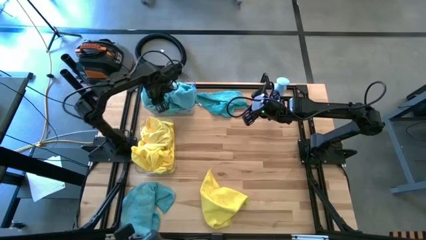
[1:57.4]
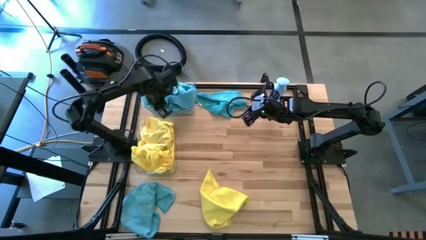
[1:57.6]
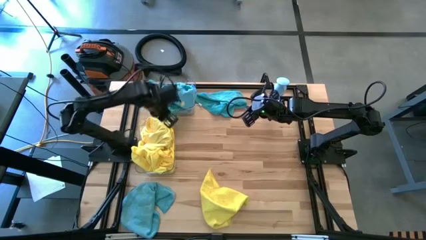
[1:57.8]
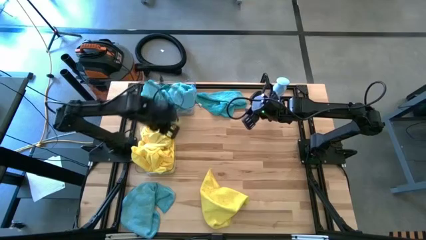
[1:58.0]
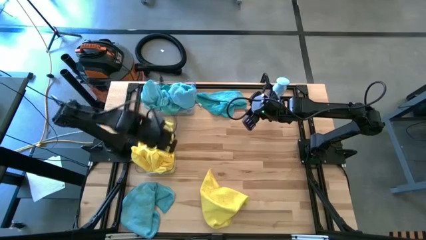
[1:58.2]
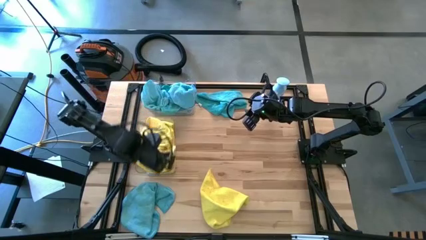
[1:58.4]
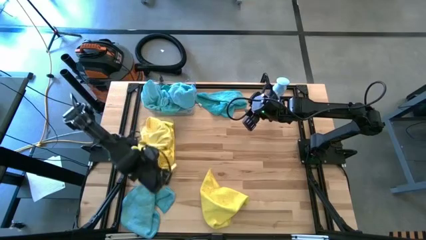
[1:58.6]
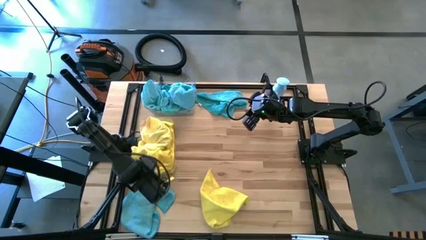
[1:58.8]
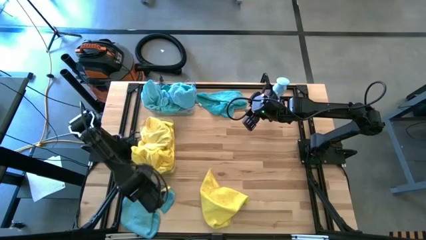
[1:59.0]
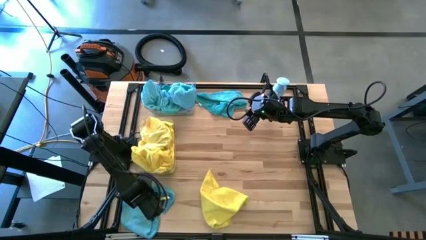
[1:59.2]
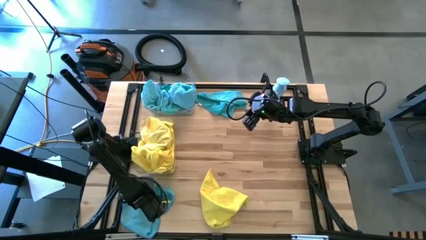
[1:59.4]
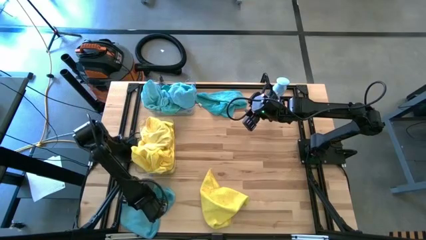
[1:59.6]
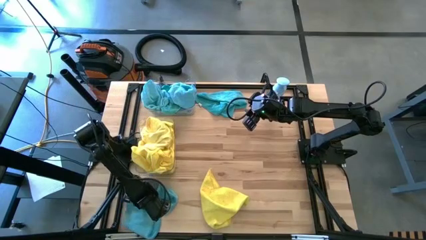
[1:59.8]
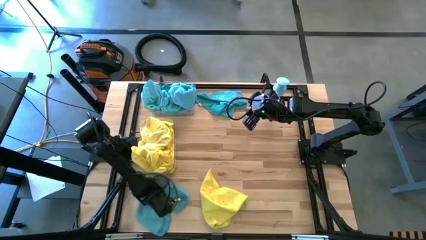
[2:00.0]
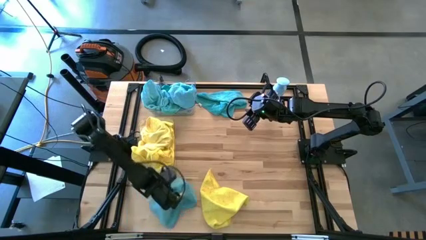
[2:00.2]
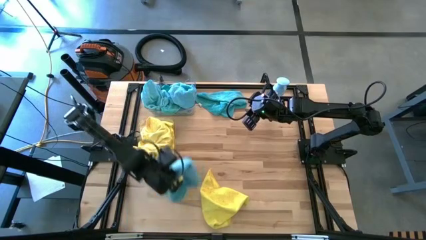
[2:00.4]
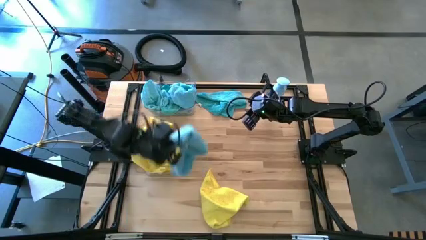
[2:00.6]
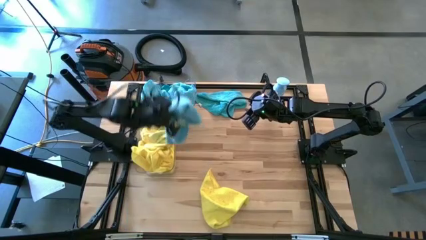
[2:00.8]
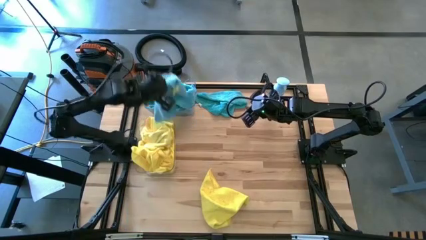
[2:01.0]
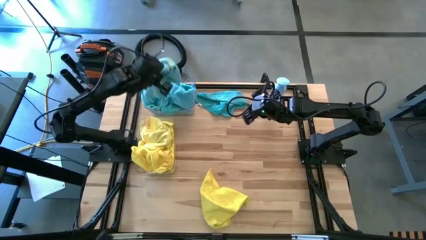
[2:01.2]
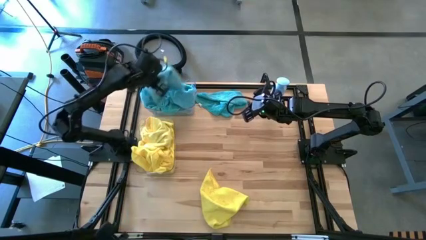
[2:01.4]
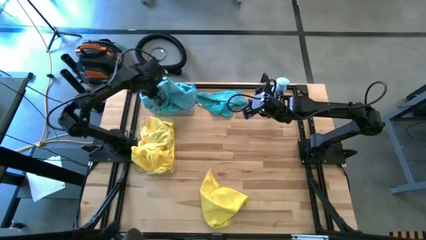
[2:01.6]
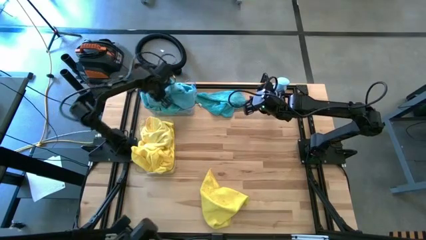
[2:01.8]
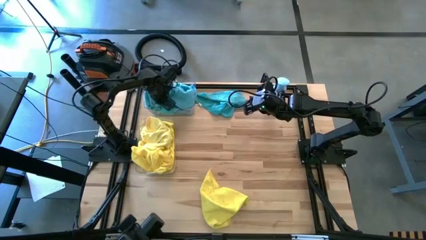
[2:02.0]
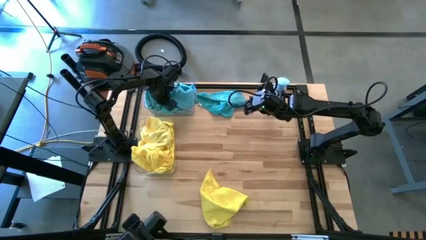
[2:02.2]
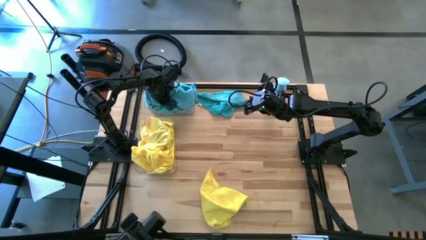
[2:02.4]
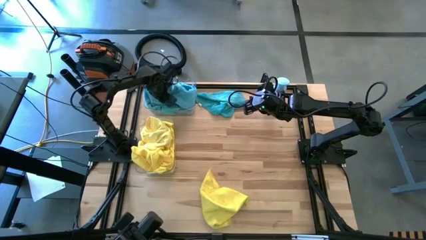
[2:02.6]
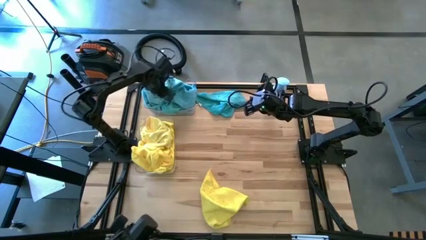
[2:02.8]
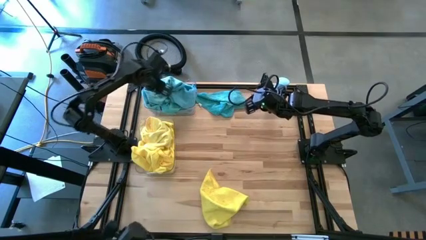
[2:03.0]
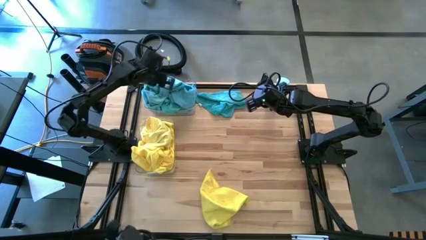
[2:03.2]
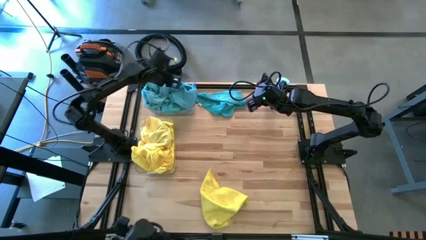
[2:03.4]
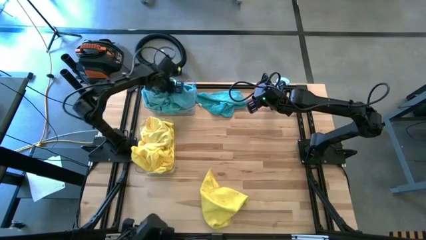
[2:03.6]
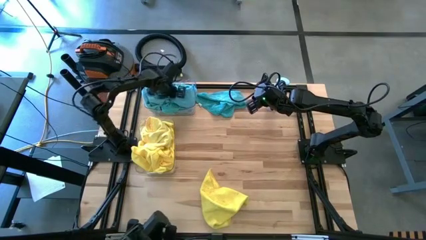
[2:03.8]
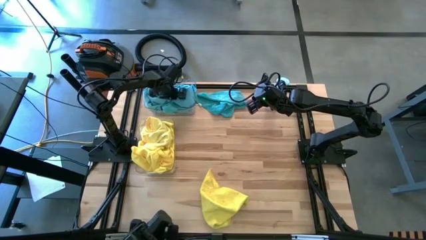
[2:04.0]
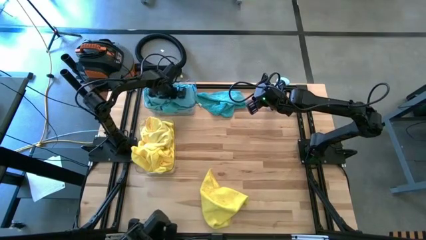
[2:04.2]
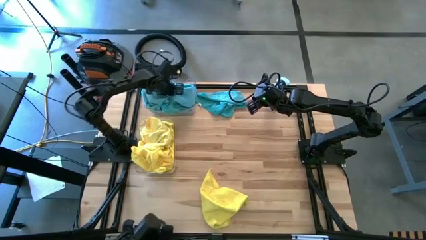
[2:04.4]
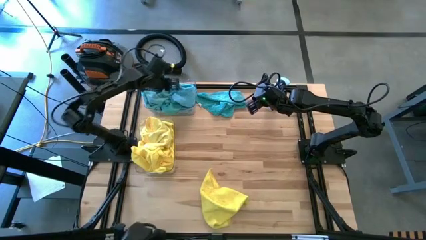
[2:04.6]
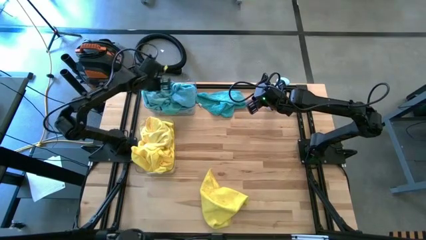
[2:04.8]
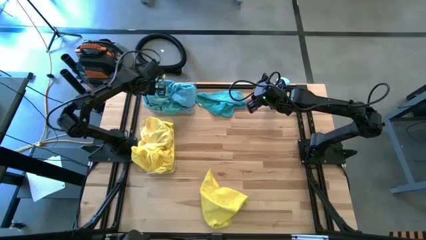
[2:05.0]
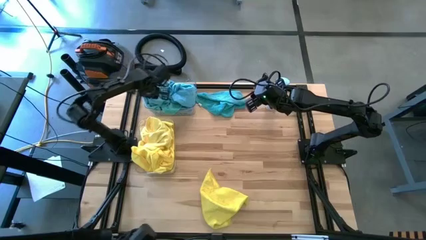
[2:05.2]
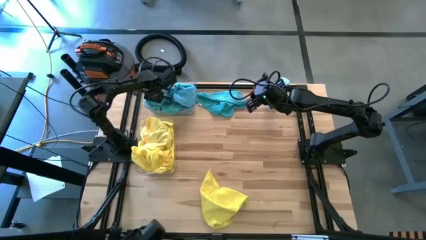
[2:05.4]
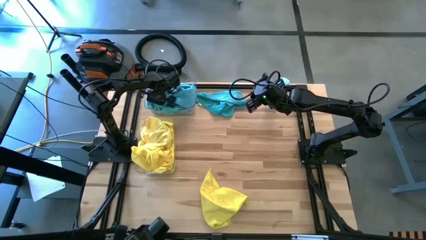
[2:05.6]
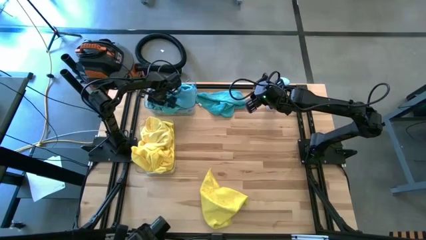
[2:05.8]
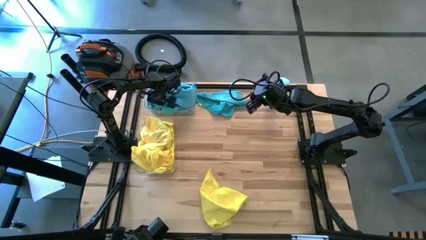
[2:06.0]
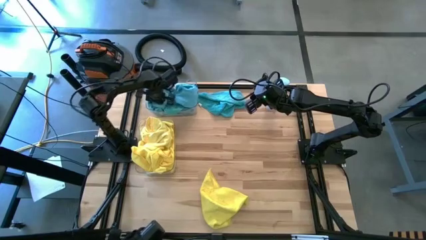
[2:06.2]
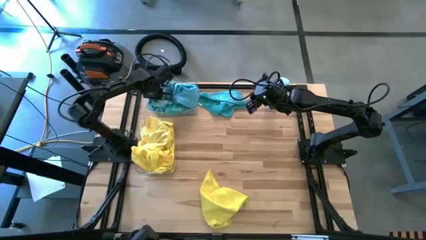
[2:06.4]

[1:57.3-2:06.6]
Task: Sort microfiber towel by color & place in baskets
Put the blue towel into the top transparent bin

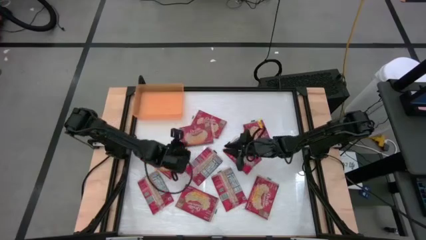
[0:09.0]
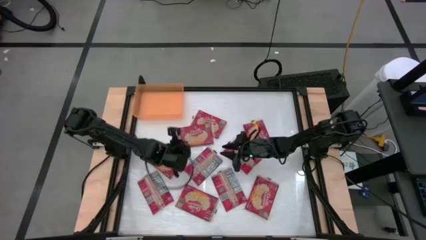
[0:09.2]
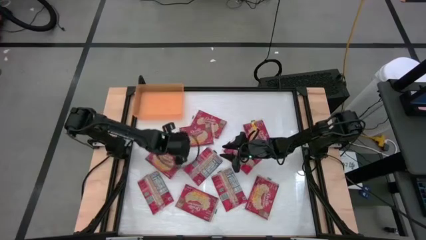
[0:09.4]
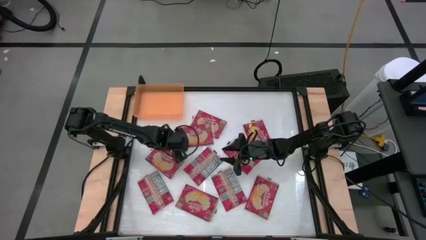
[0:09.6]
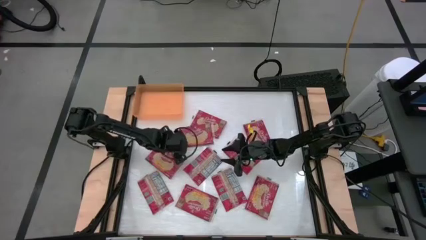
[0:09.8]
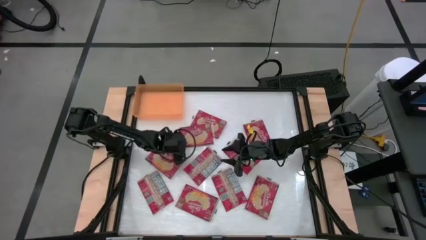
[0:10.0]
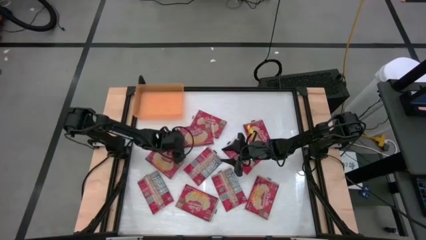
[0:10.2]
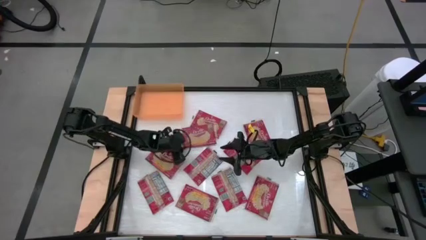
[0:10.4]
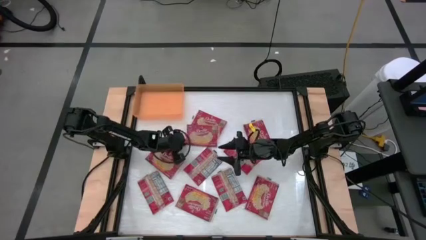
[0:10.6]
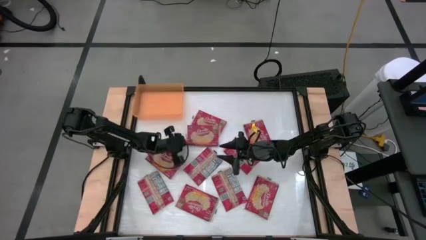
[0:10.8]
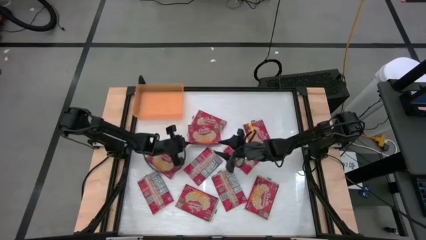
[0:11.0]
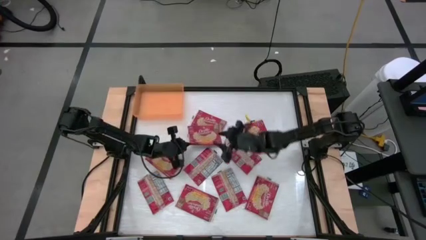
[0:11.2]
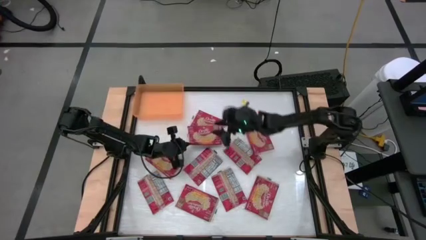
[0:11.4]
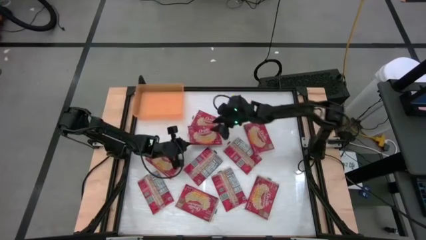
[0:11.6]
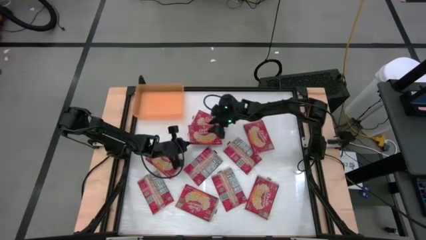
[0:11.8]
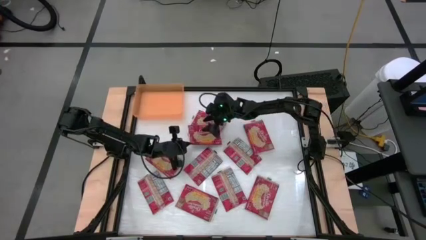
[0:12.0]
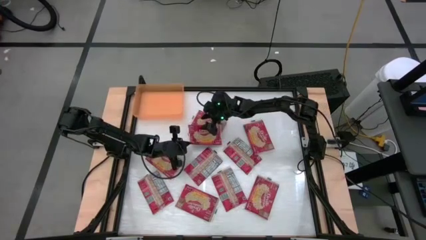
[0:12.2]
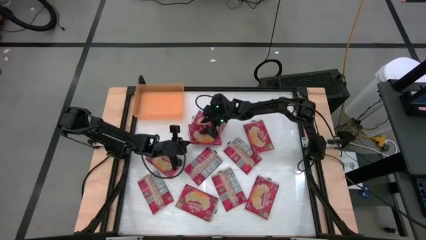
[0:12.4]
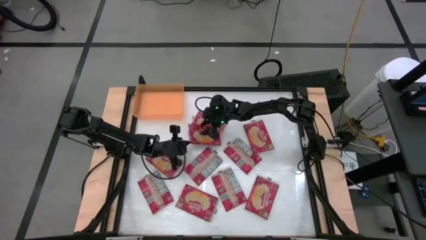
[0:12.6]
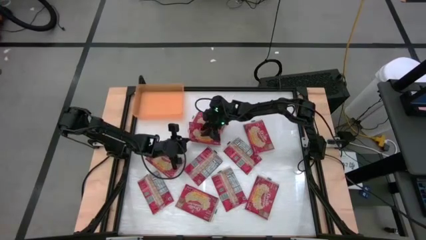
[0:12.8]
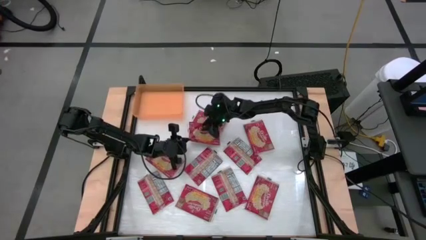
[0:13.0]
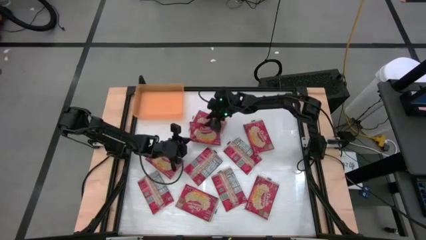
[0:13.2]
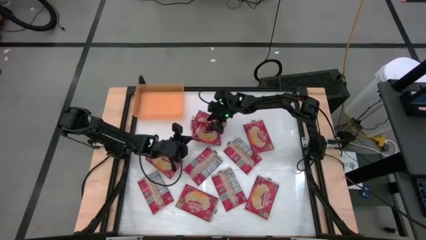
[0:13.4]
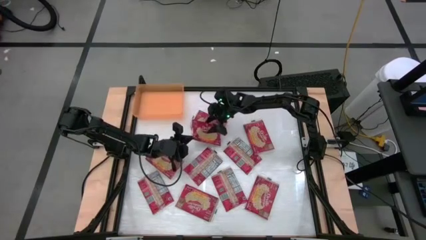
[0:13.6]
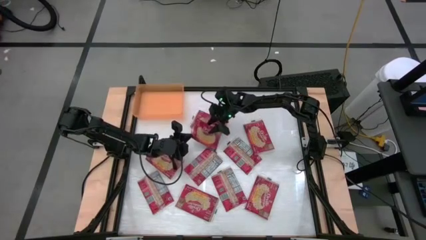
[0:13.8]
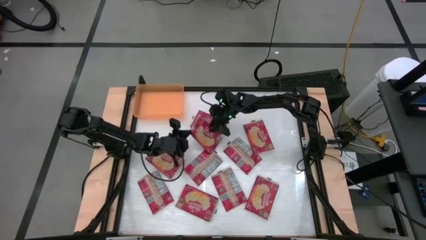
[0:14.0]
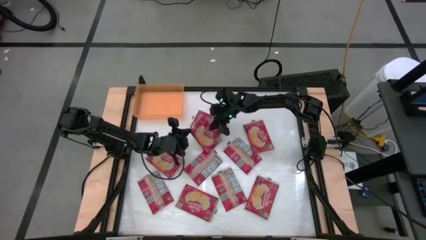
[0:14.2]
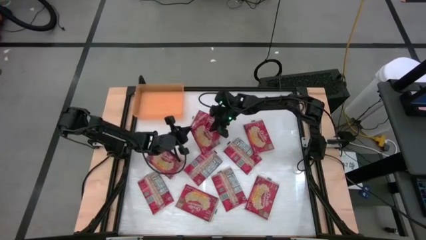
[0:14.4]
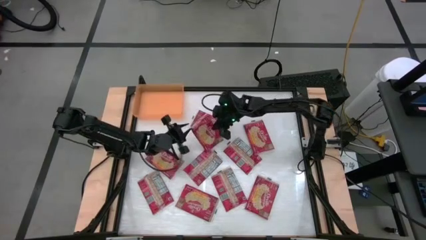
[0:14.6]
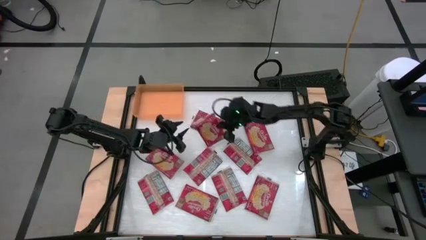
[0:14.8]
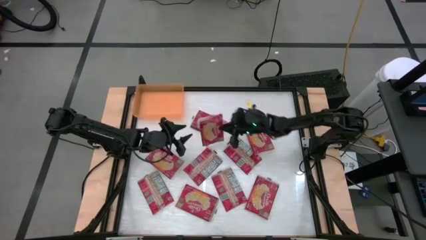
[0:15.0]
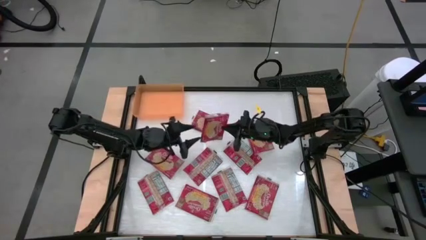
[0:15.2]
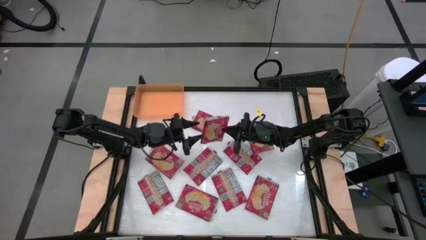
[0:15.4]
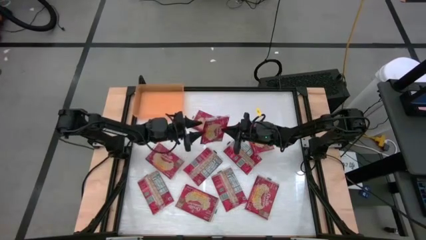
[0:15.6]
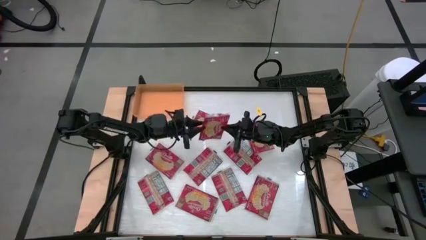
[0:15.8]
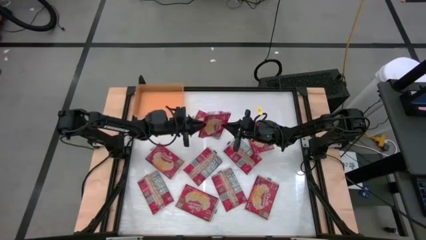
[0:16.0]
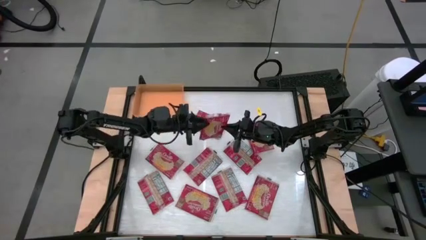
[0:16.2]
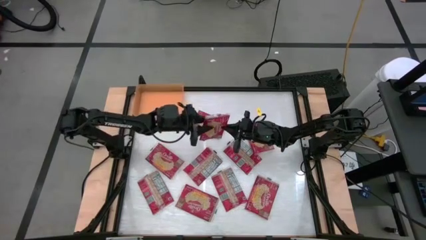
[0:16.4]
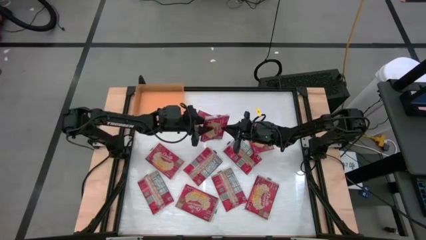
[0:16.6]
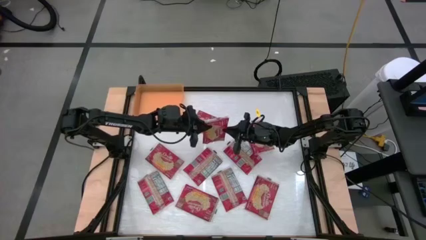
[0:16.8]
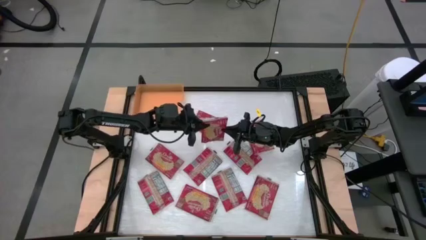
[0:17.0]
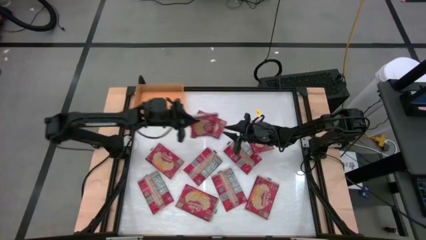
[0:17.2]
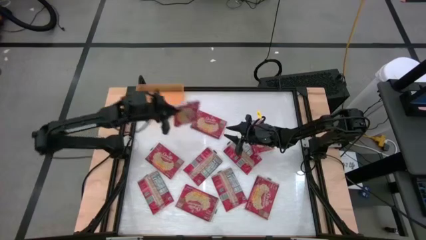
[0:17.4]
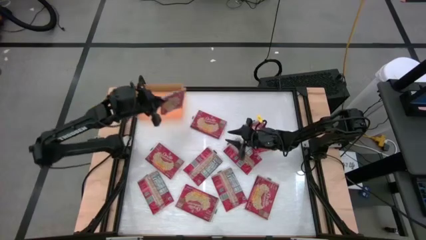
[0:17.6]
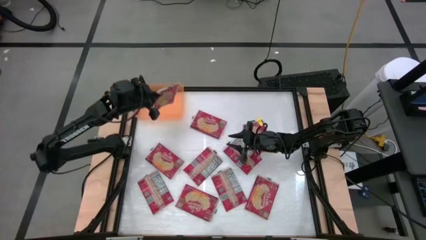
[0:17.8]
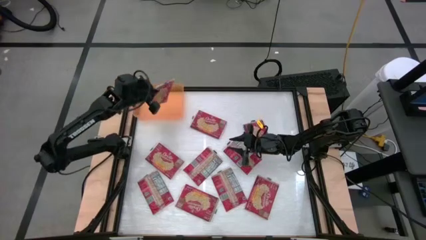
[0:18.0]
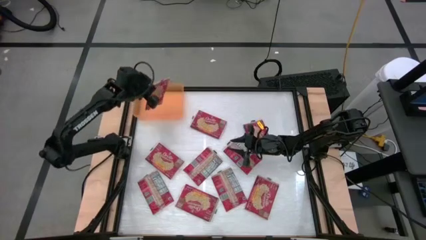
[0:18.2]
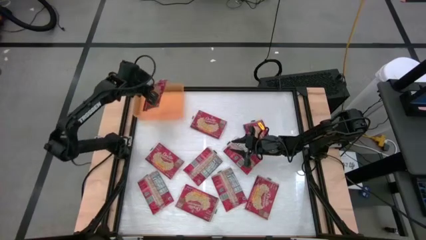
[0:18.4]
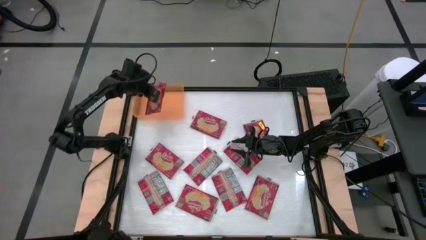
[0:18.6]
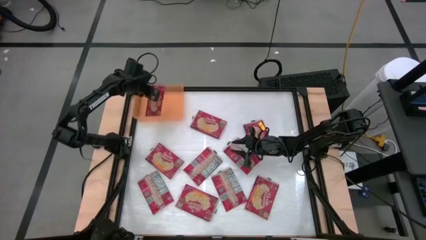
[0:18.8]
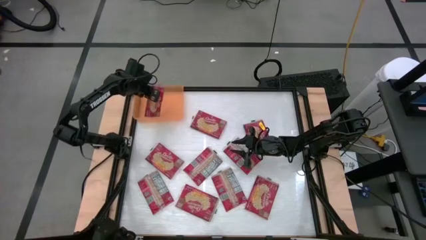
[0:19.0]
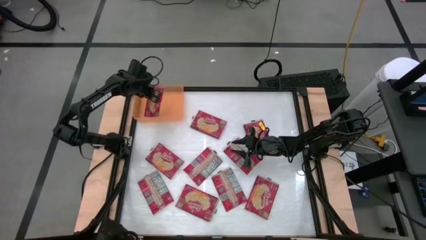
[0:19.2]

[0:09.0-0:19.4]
Task: Sort popcorn bags into baskets
Put the red popcorn bag into the orange bin
